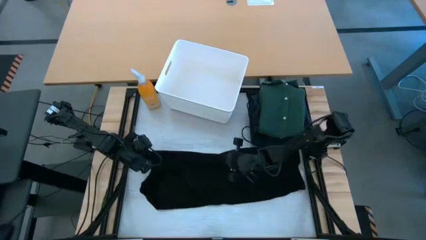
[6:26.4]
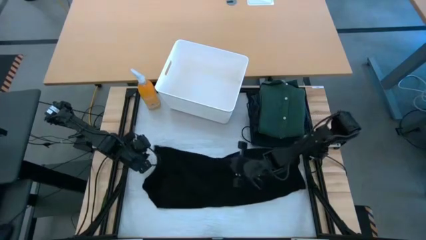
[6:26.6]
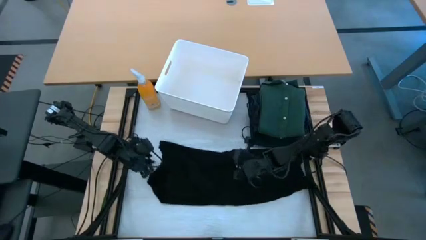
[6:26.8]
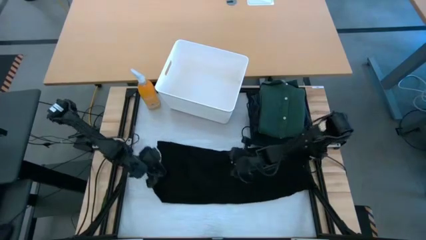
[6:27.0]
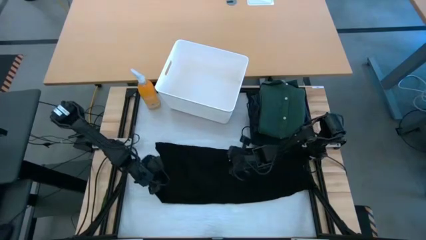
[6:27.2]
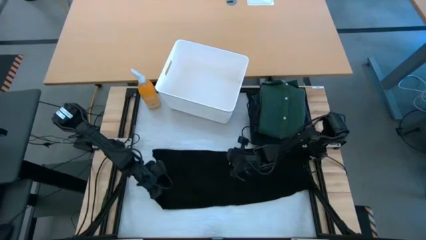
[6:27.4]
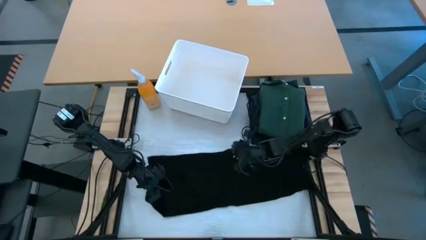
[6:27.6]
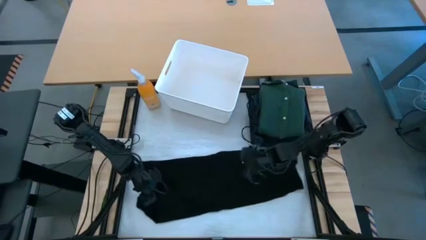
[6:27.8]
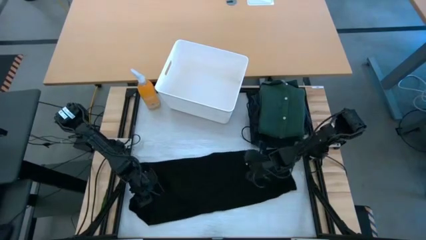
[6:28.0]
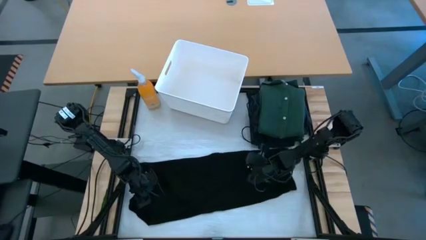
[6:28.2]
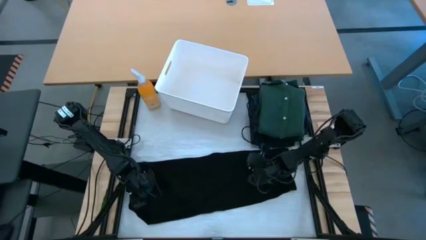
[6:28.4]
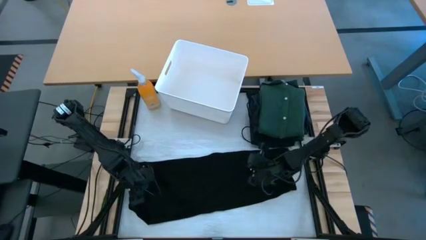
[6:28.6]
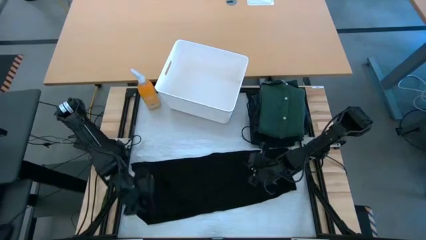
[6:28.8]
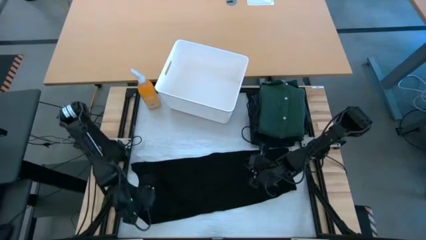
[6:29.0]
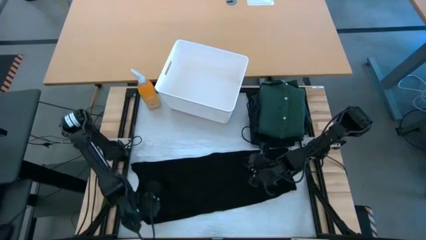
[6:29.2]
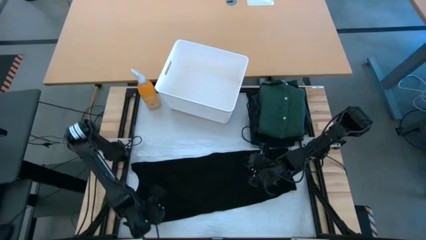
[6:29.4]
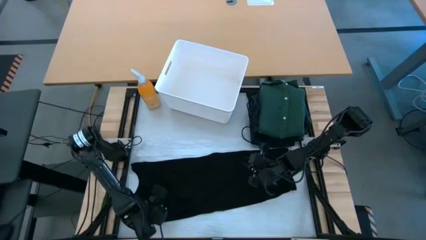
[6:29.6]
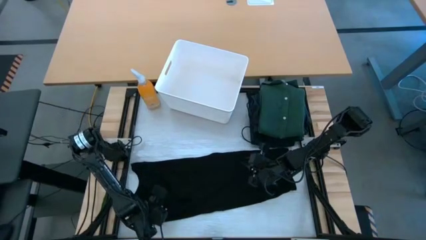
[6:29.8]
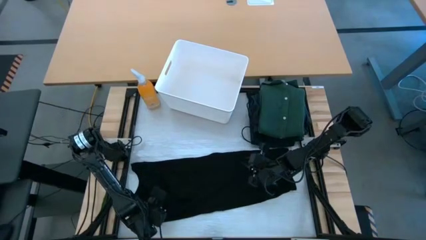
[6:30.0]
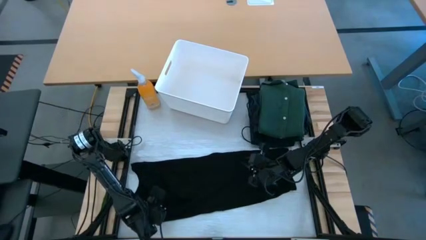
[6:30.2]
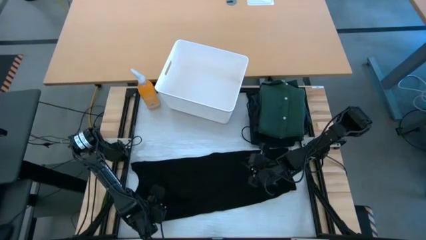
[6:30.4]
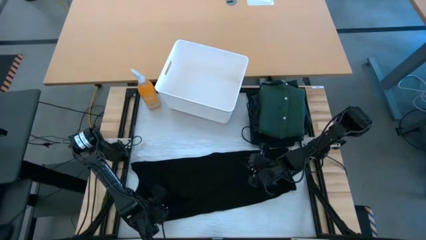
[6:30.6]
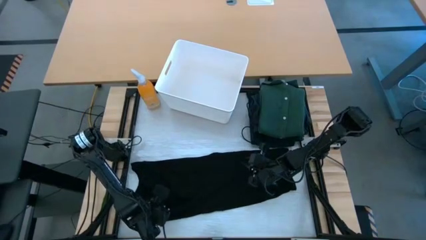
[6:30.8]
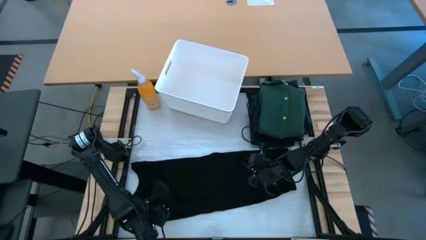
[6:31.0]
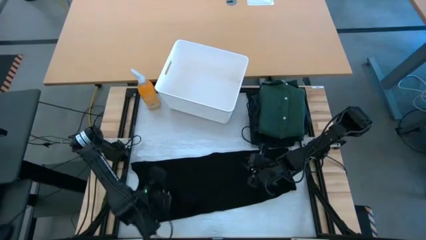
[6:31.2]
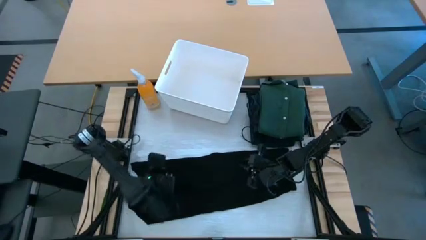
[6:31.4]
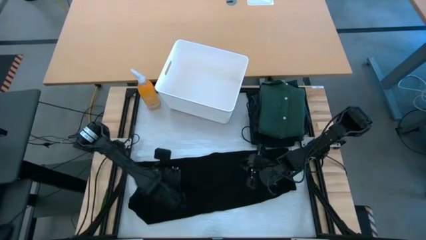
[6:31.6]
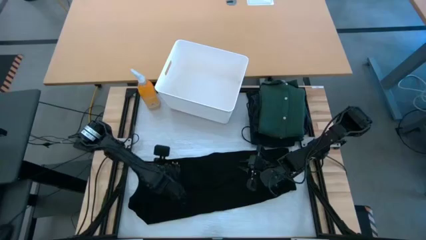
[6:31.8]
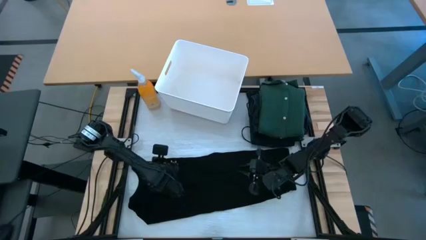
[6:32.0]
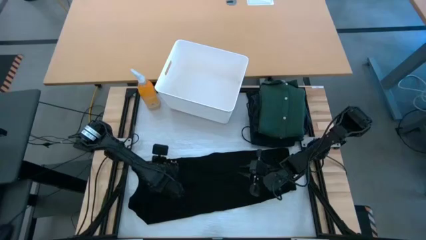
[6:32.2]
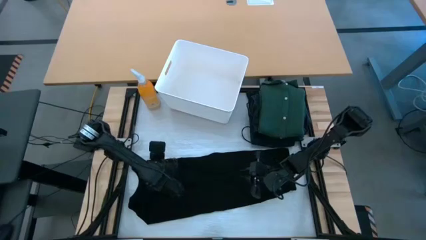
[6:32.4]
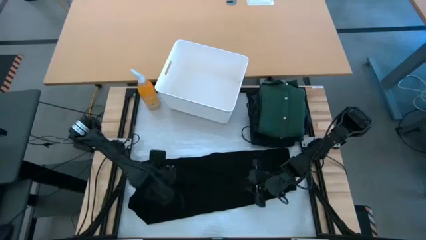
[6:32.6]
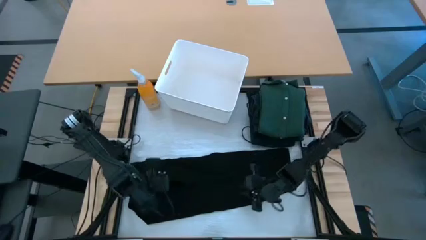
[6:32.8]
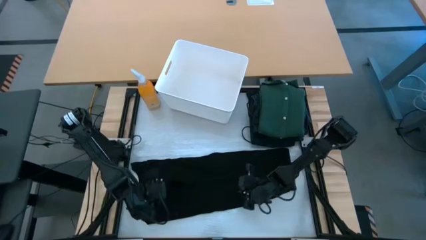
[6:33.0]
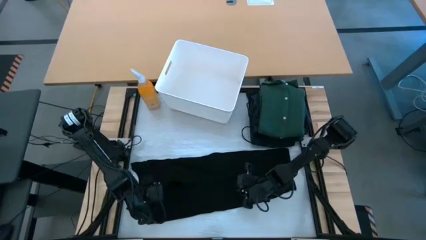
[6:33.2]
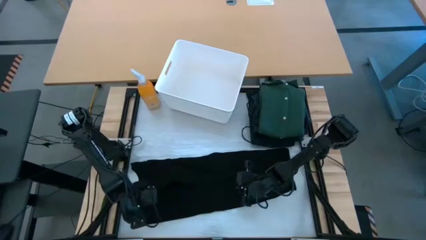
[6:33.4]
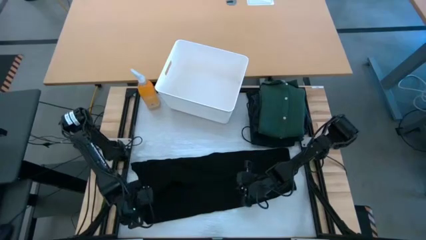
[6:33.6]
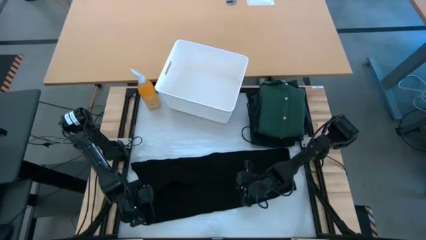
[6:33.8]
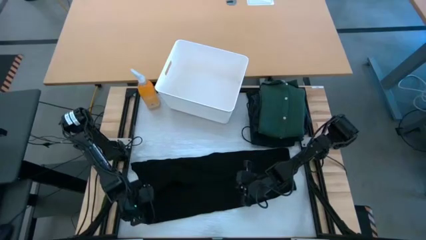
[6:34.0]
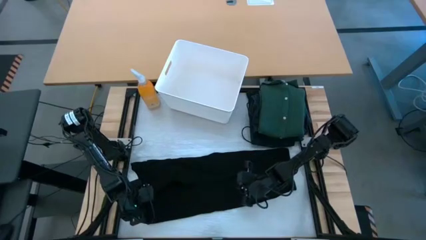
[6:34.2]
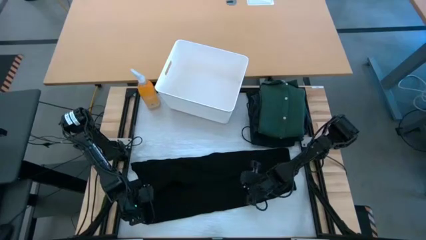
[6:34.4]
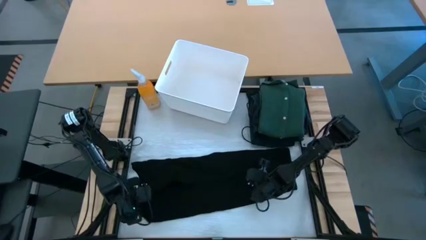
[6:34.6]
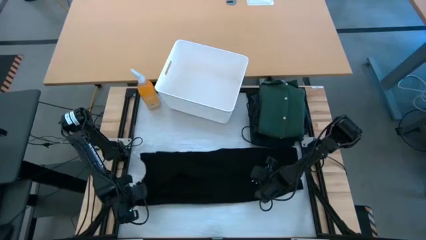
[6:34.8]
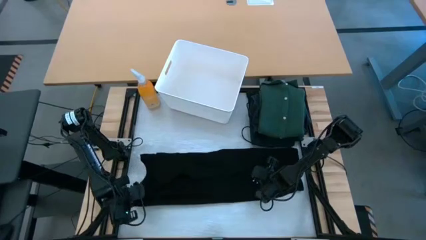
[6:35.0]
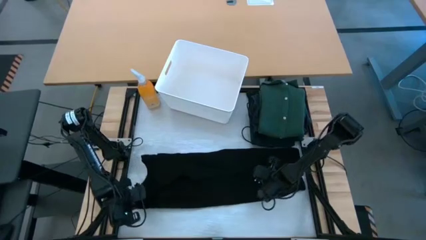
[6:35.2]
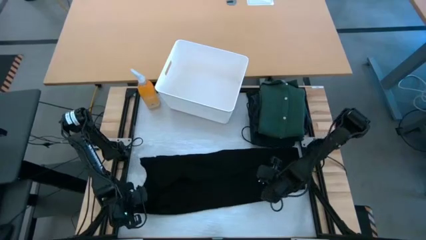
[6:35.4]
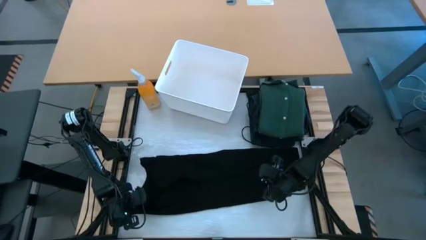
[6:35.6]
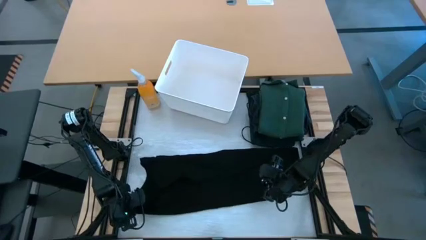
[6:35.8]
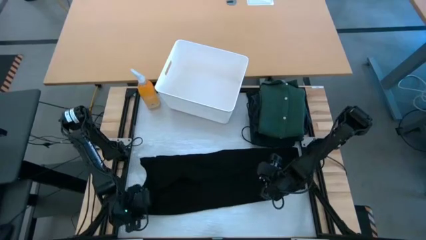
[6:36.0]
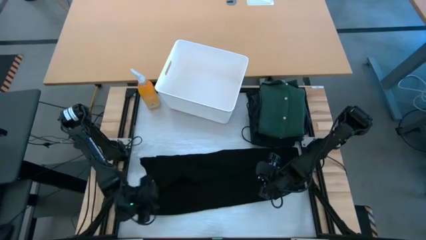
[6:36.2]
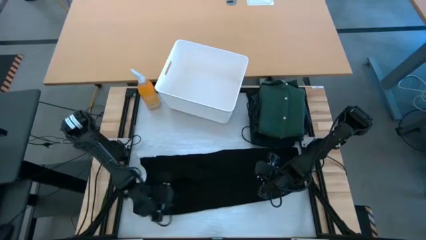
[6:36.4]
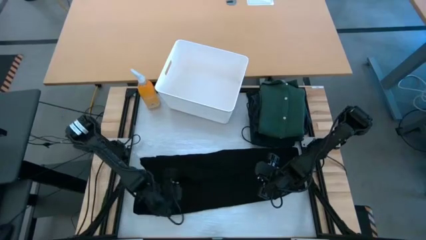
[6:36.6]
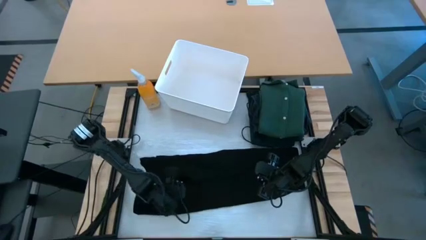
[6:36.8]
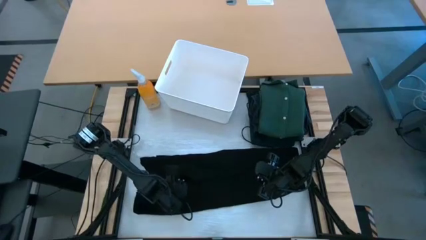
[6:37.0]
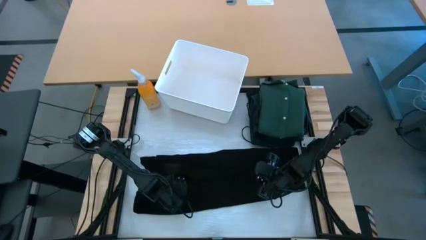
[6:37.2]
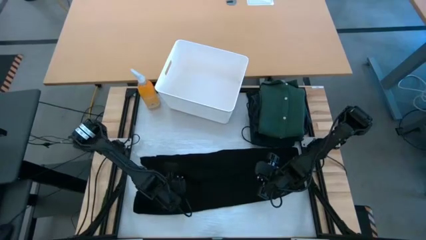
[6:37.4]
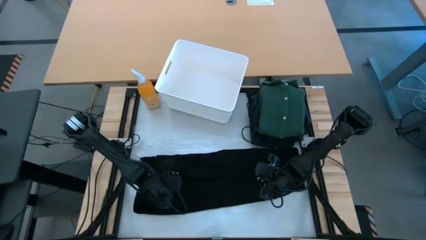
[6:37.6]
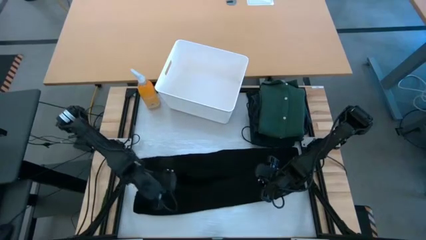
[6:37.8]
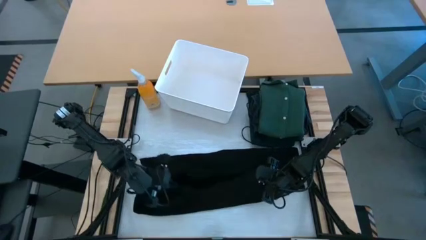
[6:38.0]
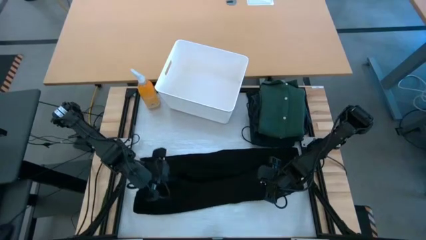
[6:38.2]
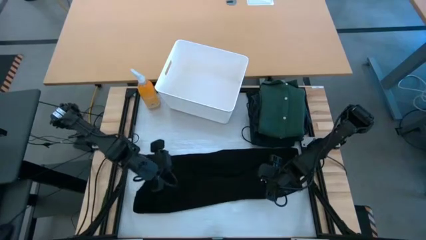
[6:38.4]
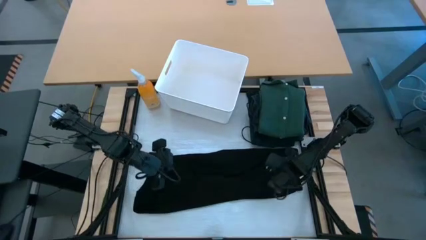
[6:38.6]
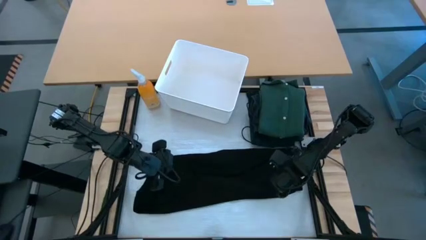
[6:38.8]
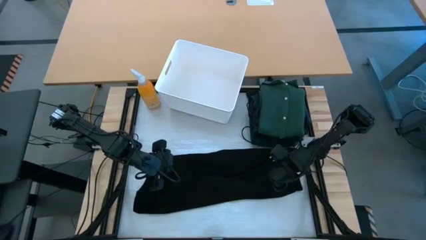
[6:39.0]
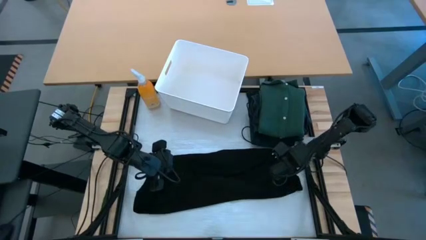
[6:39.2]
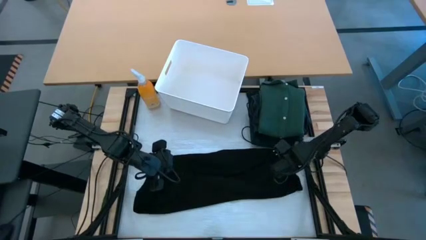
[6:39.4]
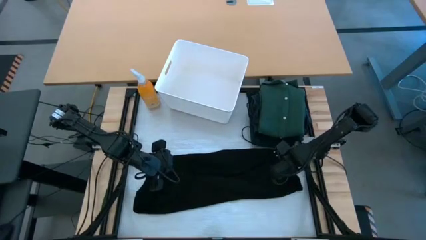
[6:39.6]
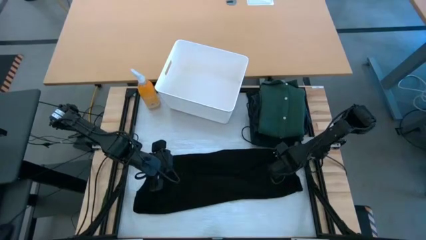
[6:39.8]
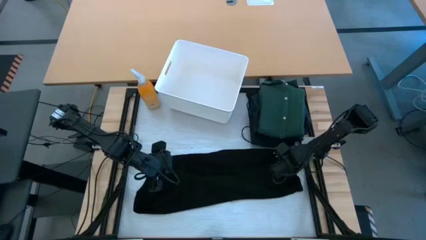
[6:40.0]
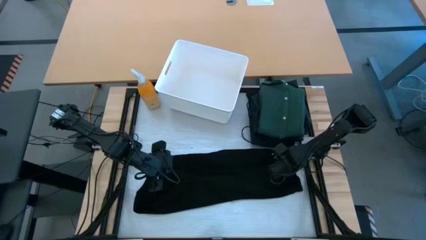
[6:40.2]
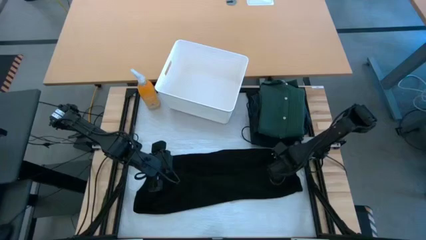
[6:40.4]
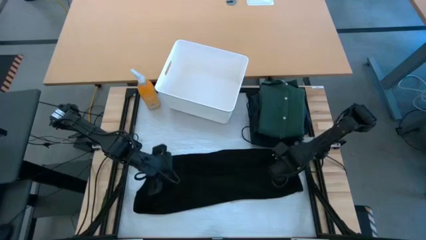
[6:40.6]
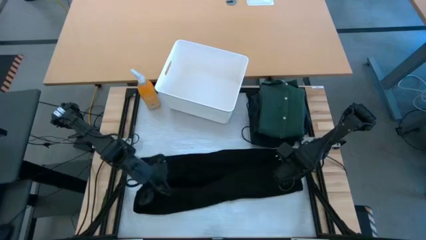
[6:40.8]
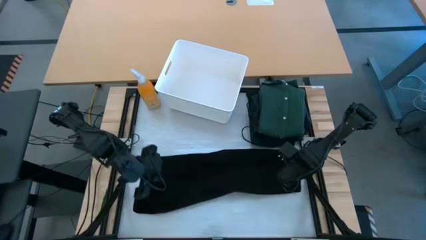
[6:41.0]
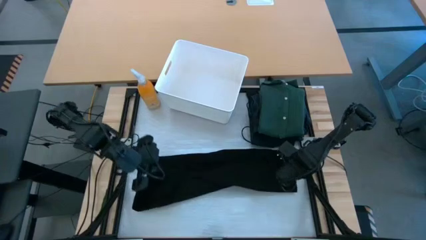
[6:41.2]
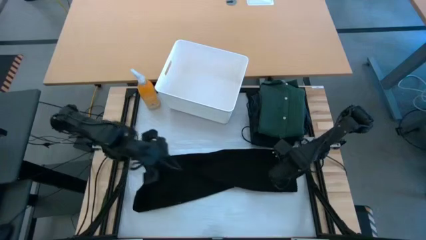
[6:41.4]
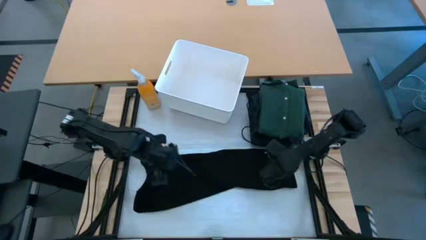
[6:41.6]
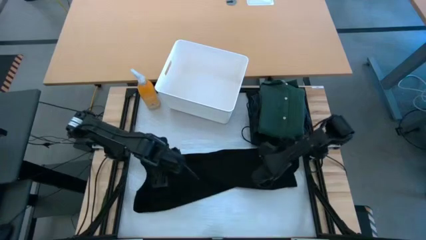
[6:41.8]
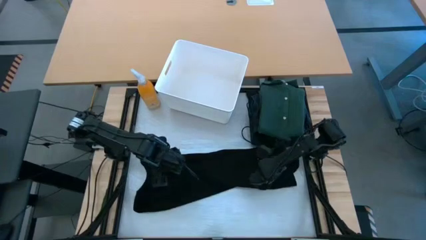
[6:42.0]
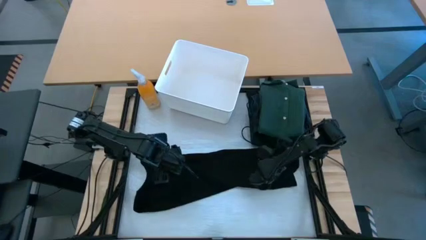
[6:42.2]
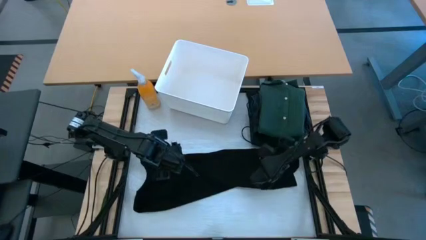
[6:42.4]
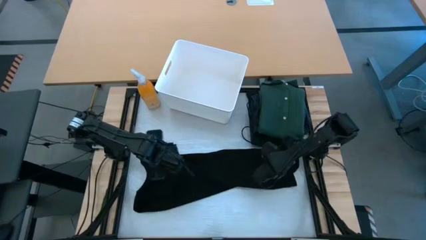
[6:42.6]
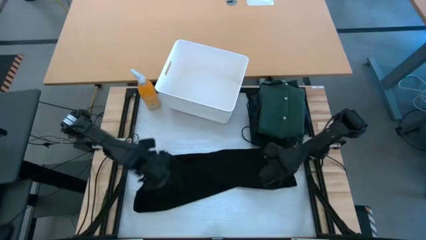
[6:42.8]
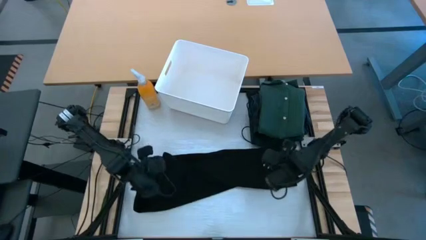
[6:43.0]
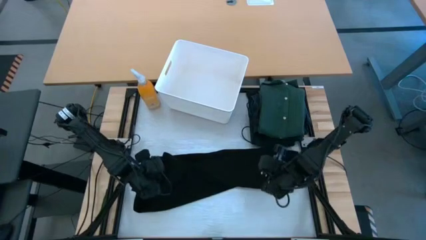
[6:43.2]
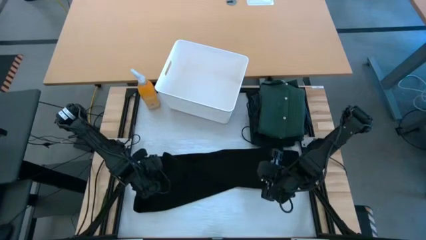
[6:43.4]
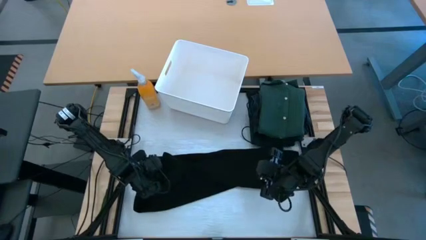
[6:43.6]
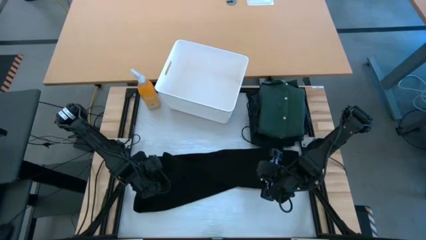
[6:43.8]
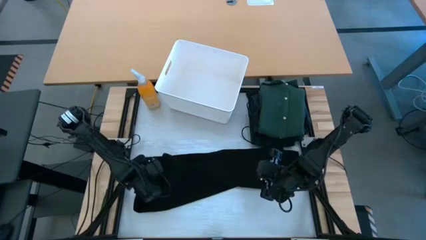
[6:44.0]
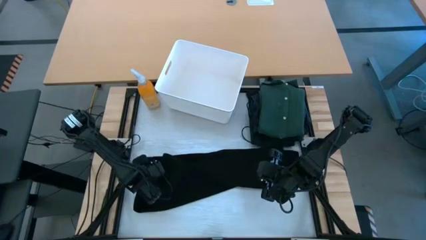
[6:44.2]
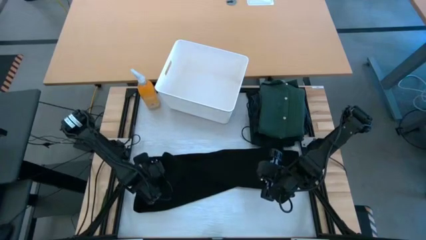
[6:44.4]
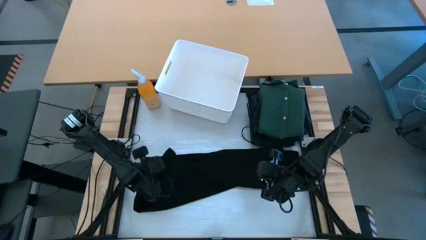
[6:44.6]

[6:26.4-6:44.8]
Task: Fold laundry
Fold the black shirt
